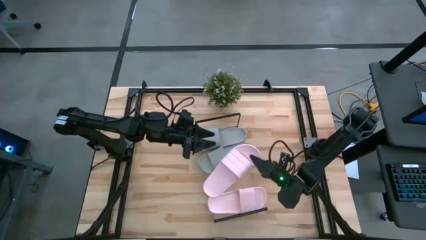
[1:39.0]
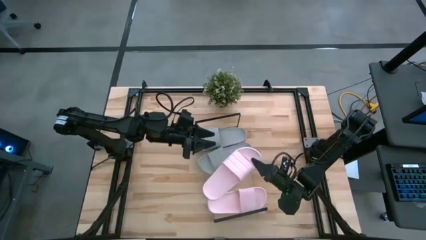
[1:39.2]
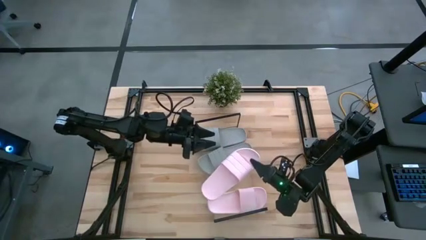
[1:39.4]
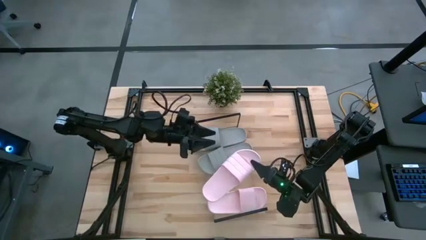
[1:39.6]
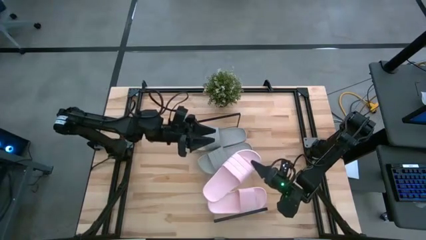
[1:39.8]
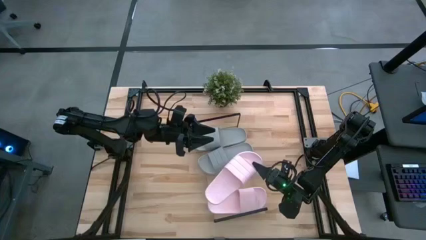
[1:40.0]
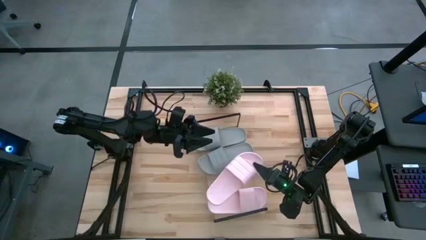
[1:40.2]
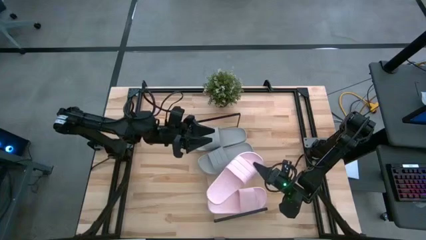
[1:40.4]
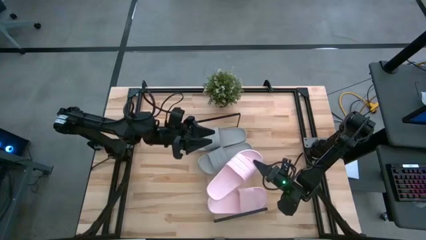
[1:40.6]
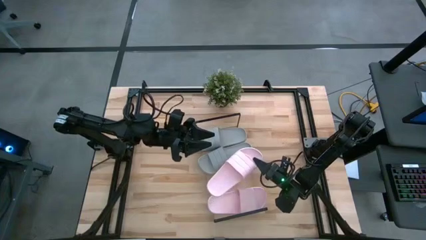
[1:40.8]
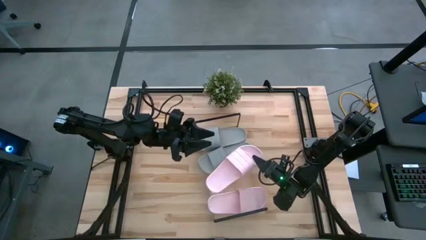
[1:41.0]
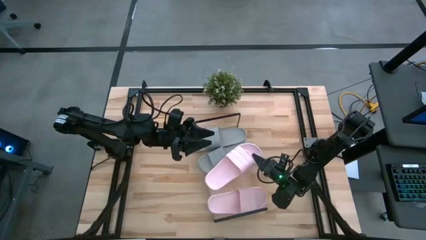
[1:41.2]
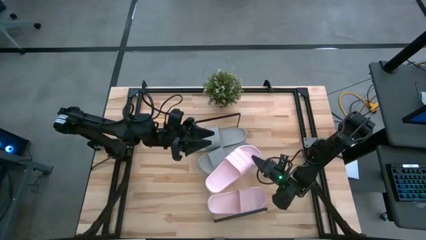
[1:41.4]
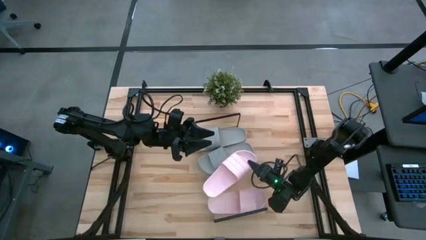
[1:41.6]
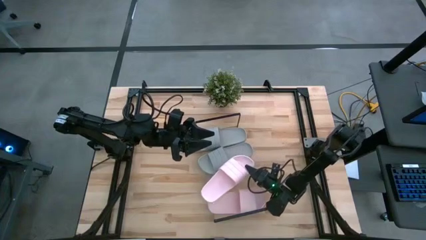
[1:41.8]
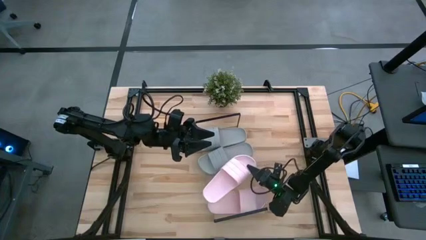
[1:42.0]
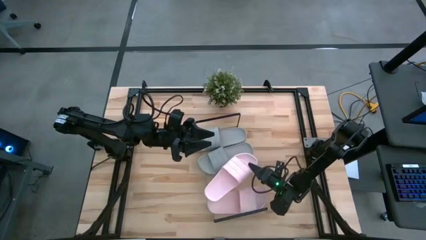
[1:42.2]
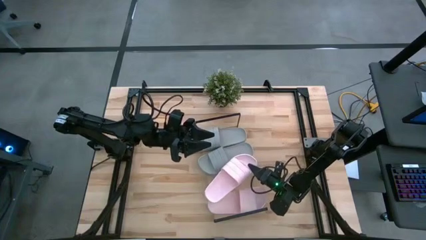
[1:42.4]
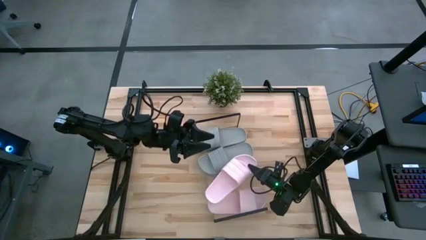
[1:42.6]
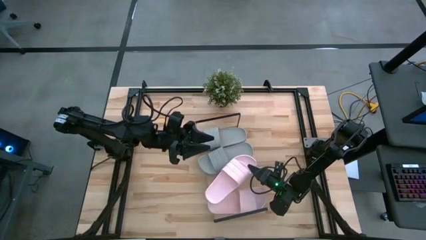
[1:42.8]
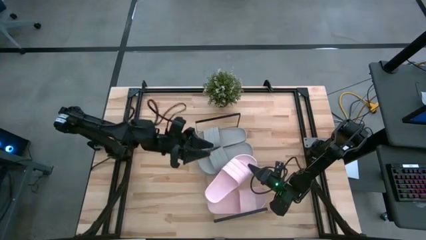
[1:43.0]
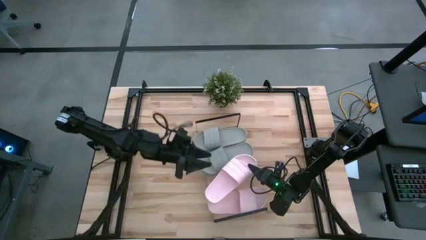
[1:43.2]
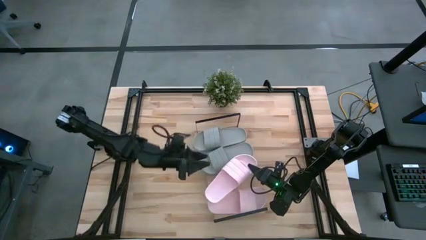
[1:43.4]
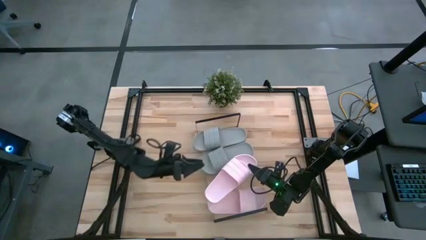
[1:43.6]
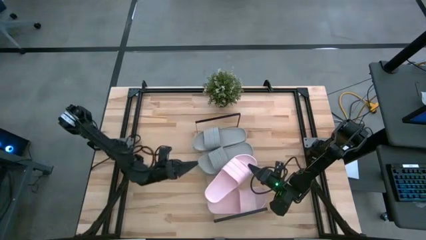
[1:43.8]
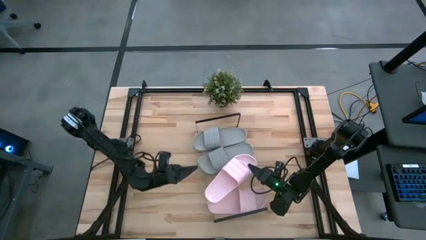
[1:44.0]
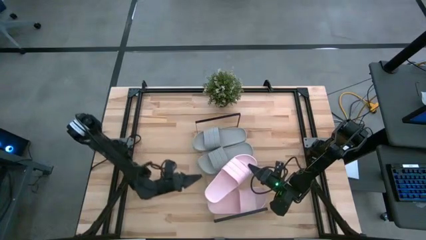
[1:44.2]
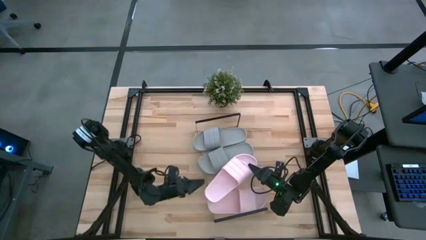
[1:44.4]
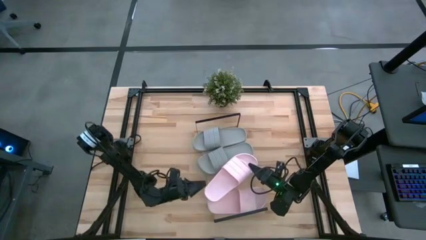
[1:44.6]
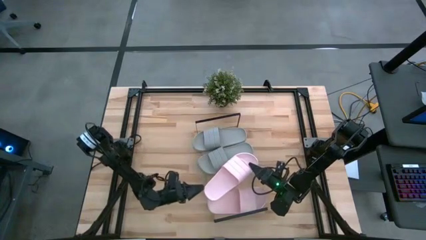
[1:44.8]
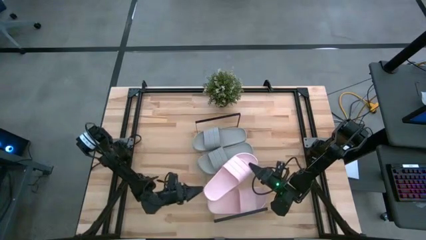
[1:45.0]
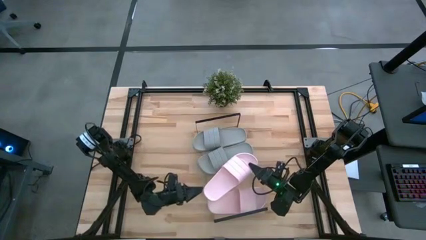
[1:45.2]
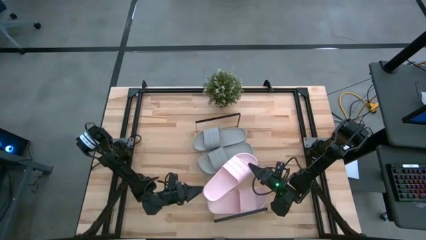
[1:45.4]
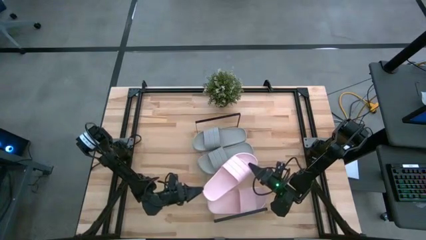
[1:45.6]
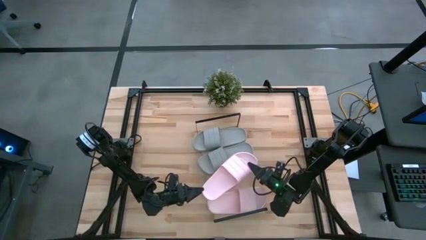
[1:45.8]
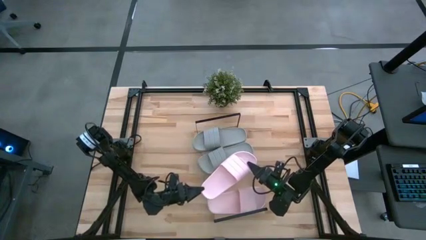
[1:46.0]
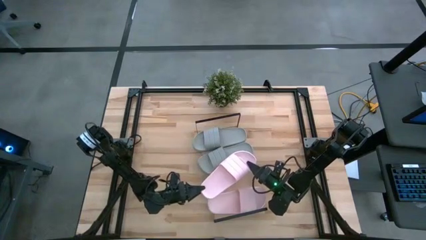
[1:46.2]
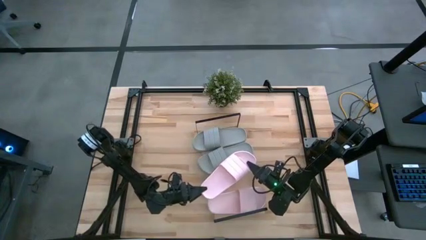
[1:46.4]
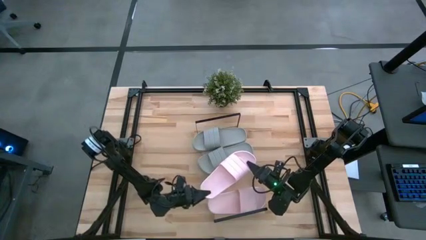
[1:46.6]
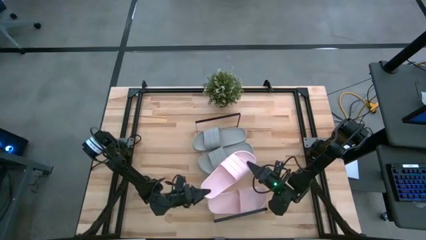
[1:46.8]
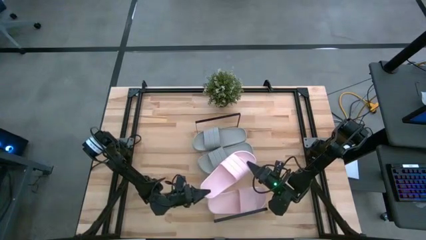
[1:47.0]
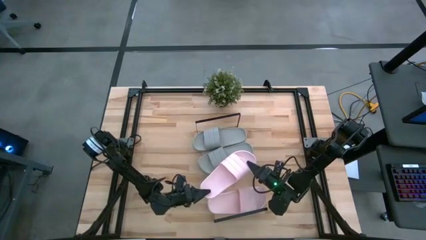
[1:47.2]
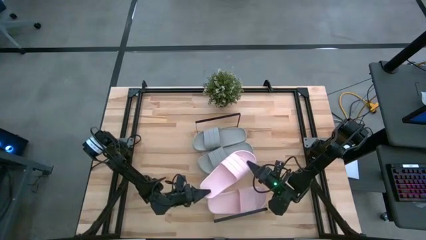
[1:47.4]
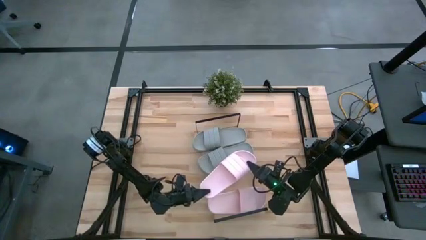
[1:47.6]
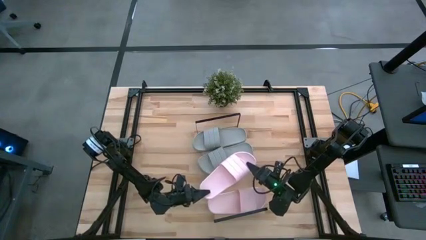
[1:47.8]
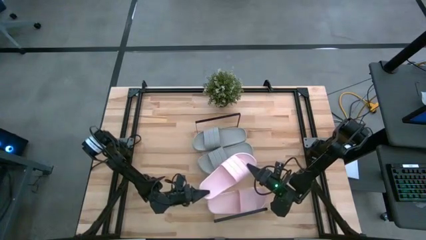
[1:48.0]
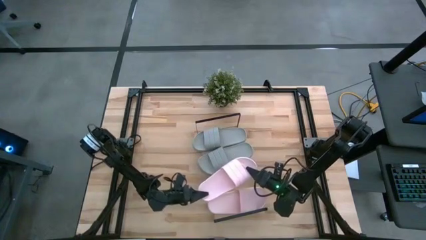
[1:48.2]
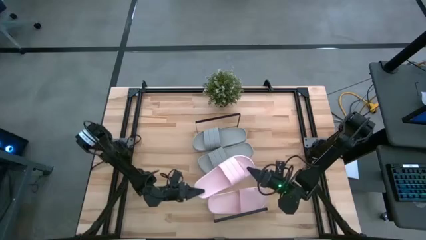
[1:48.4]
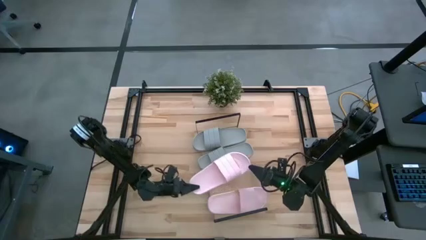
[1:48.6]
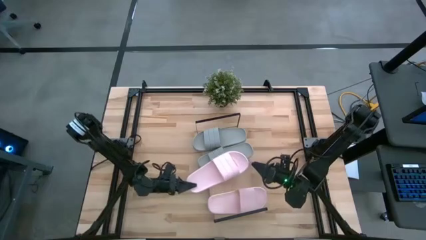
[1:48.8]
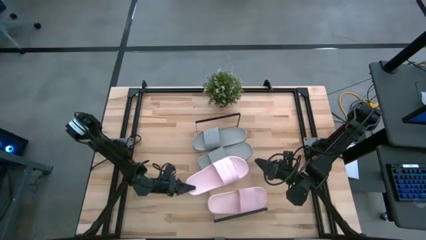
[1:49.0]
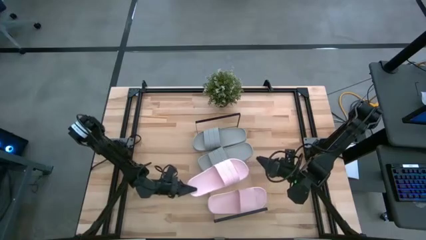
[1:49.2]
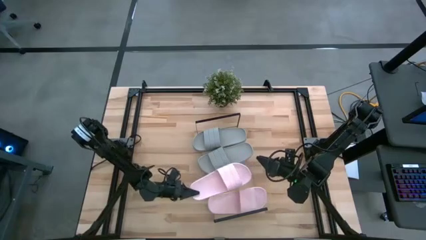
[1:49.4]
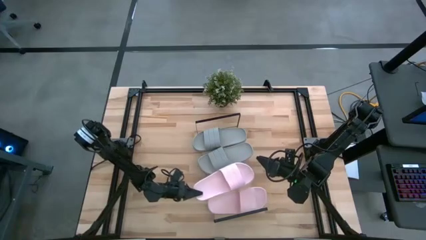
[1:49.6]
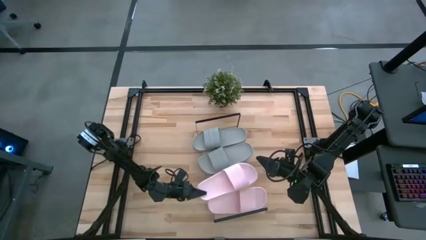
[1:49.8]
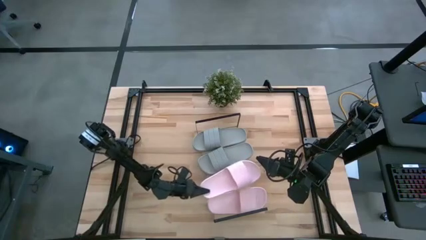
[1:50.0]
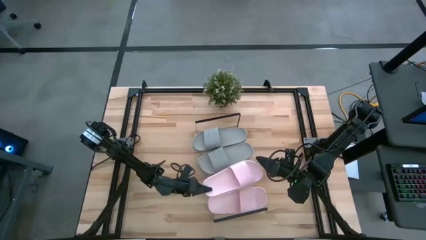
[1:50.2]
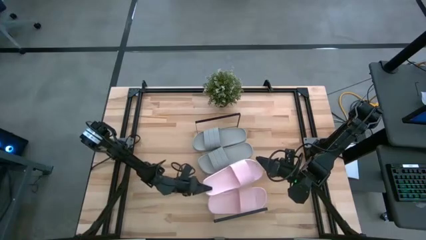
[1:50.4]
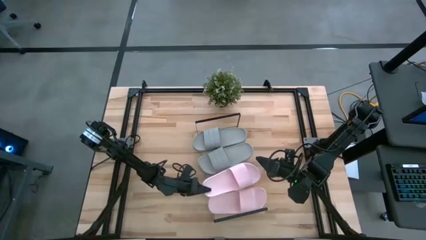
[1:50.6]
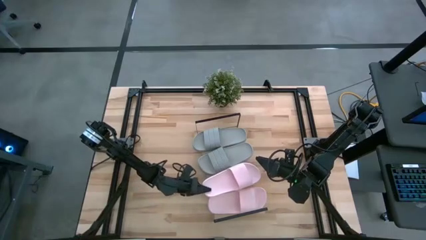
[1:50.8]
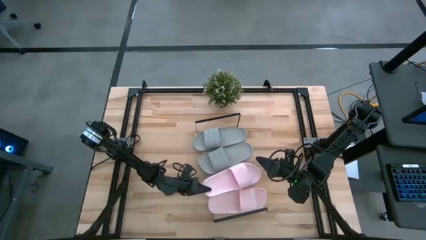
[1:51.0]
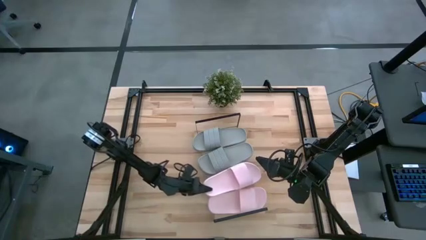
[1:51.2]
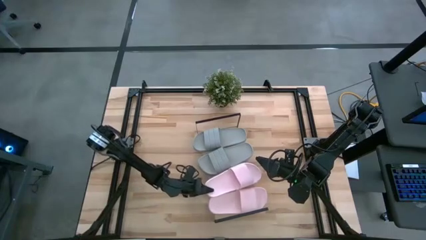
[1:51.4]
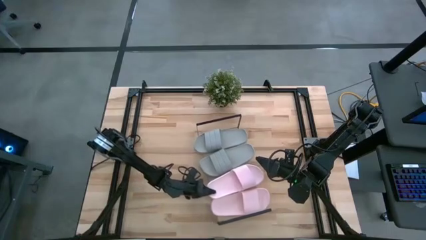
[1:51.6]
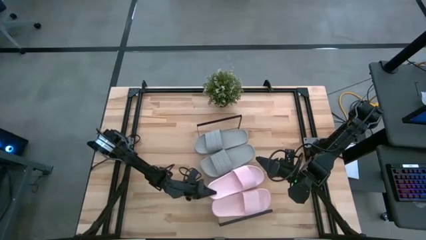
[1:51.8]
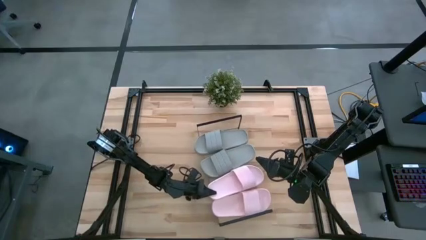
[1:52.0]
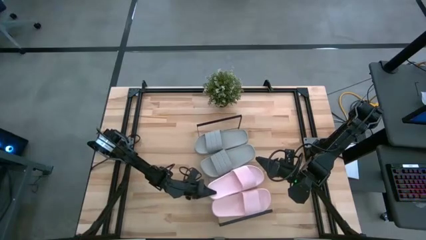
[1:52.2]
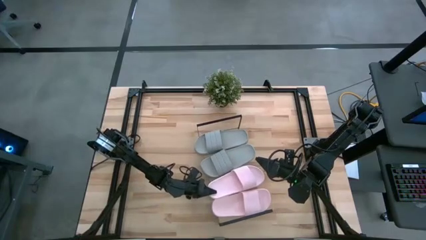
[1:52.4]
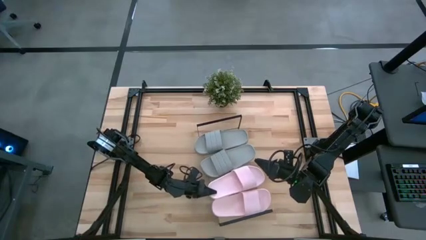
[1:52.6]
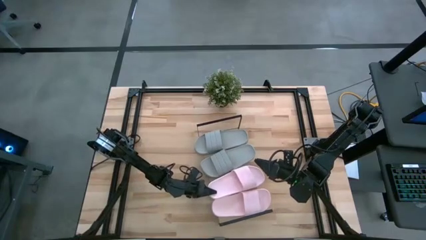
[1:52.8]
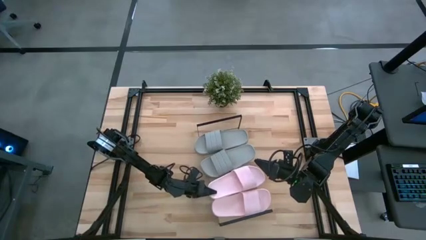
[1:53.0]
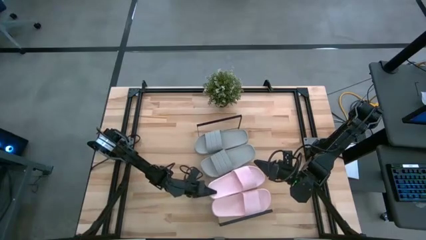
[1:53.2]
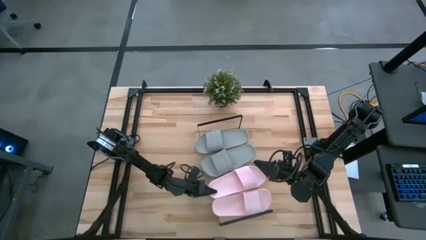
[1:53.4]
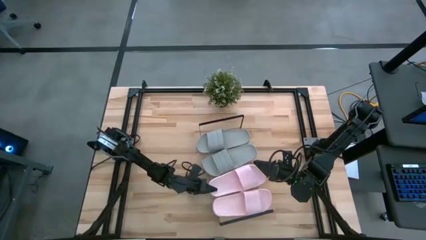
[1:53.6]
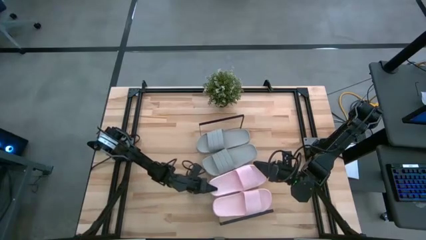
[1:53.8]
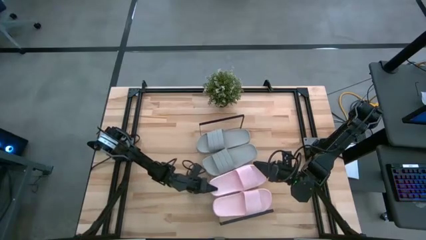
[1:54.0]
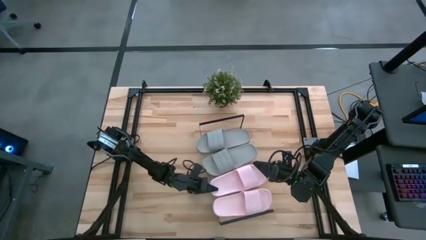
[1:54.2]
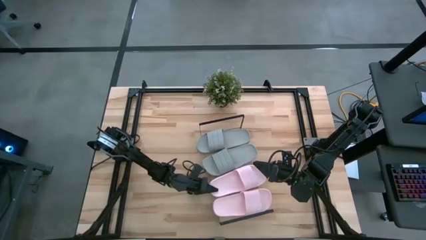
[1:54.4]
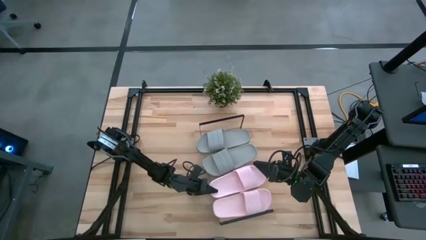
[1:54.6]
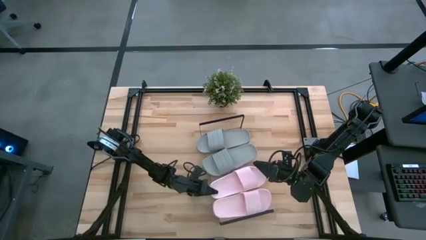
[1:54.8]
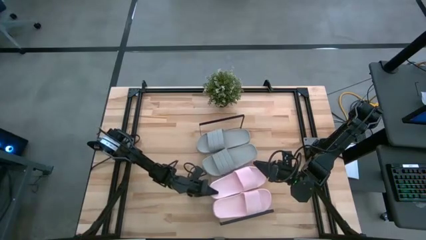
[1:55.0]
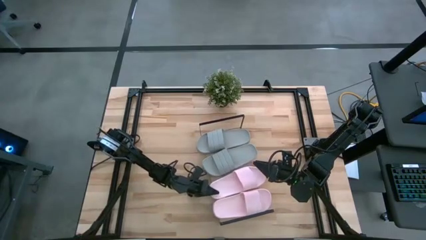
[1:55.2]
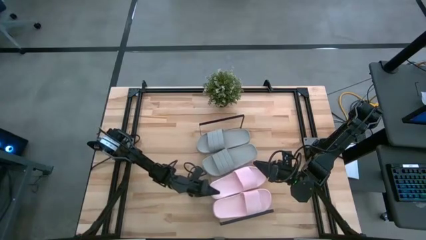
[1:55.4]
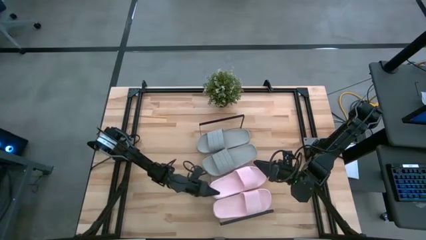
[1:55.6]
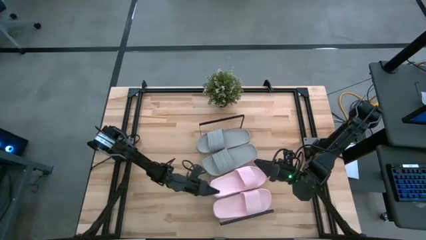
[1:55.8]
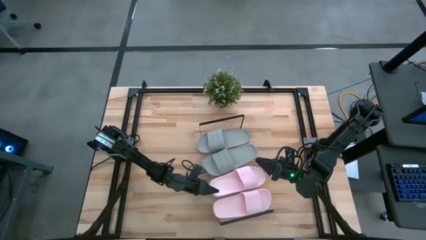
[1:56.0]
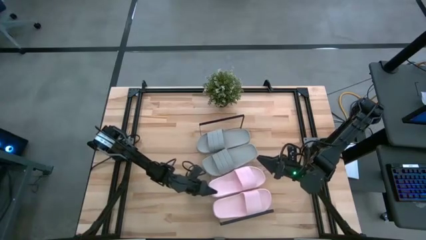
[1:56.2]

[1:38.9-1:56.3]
Task: Pick and place slides into the shelf
Put the pink slide on the shelf
